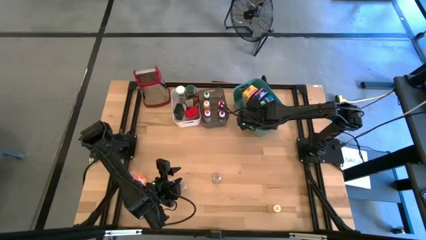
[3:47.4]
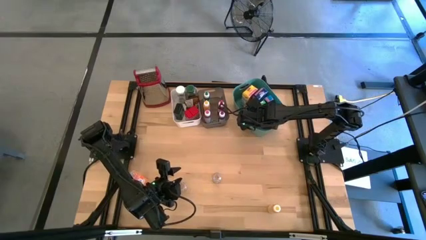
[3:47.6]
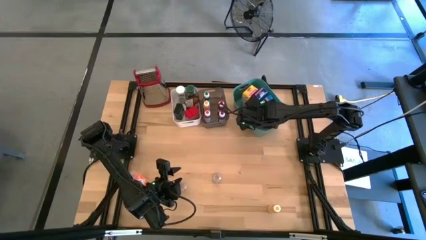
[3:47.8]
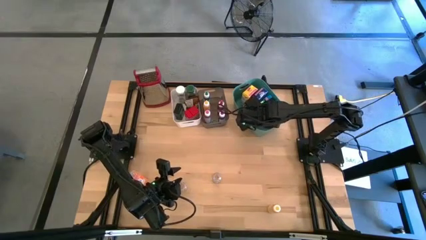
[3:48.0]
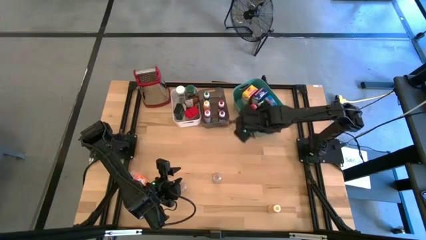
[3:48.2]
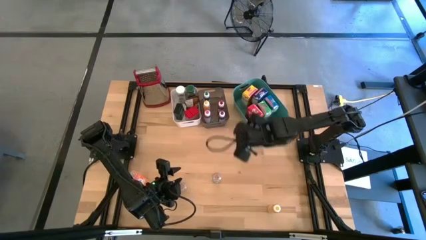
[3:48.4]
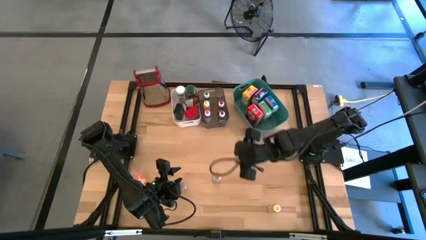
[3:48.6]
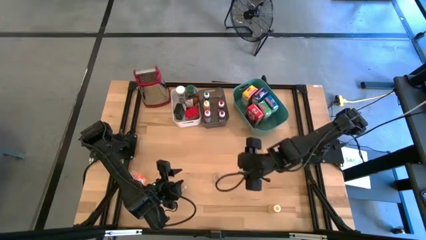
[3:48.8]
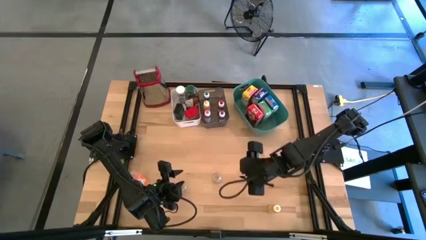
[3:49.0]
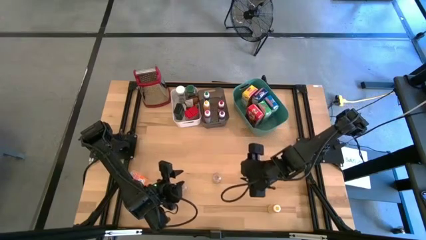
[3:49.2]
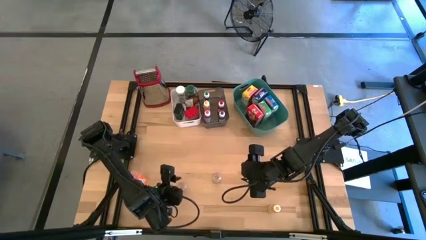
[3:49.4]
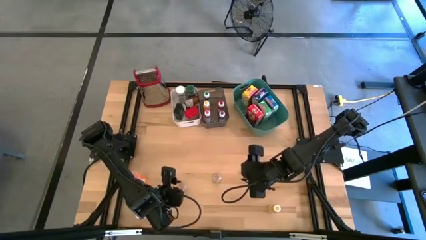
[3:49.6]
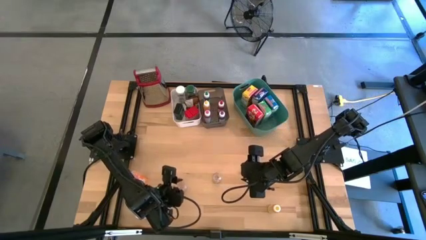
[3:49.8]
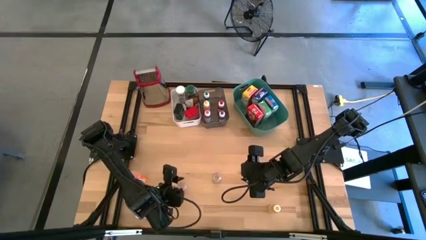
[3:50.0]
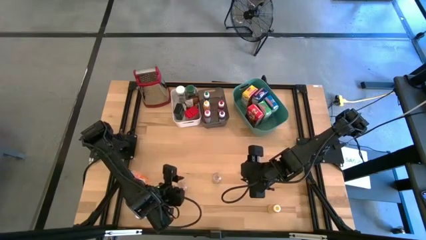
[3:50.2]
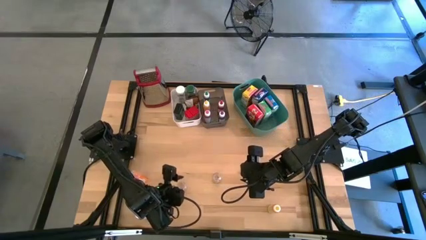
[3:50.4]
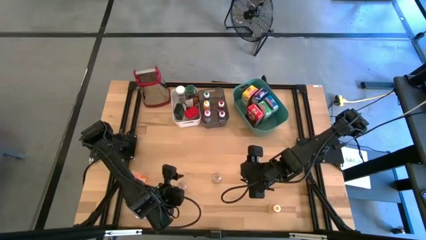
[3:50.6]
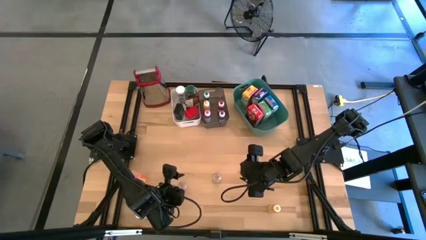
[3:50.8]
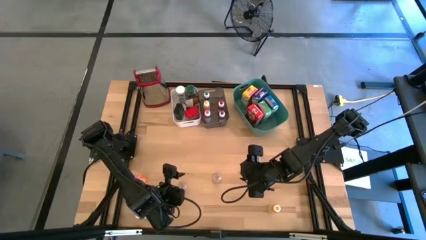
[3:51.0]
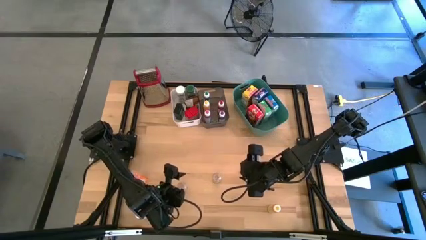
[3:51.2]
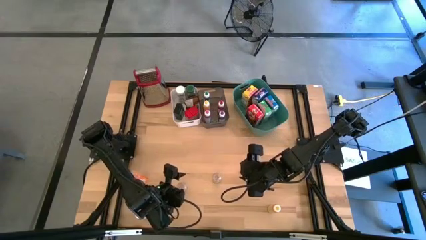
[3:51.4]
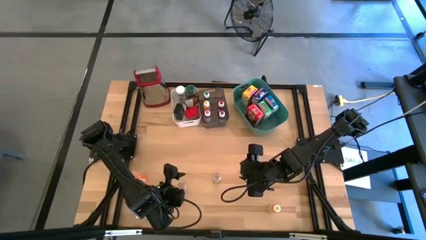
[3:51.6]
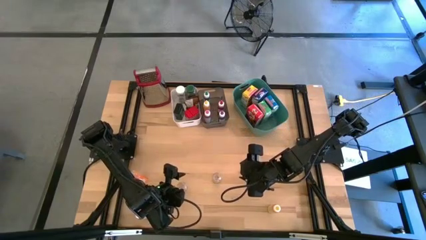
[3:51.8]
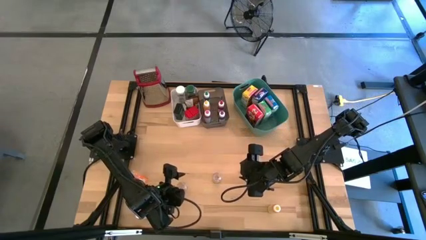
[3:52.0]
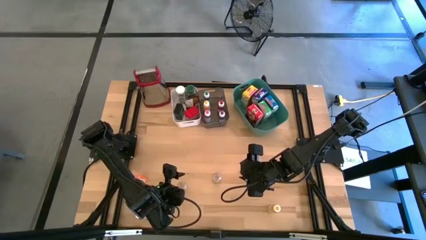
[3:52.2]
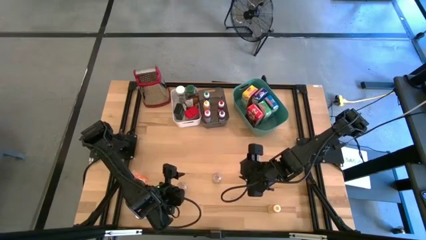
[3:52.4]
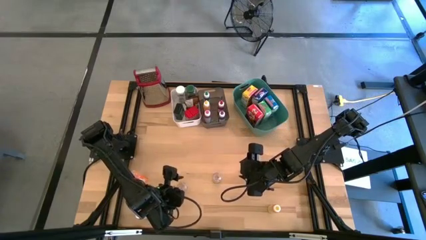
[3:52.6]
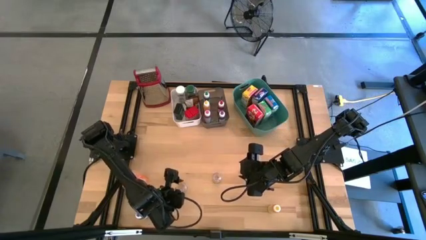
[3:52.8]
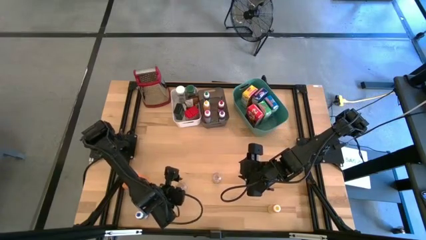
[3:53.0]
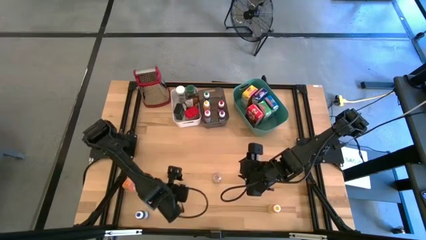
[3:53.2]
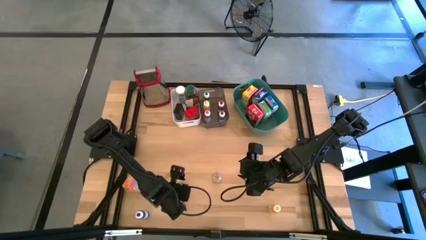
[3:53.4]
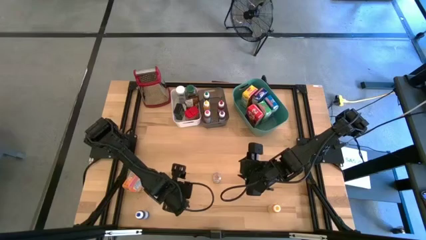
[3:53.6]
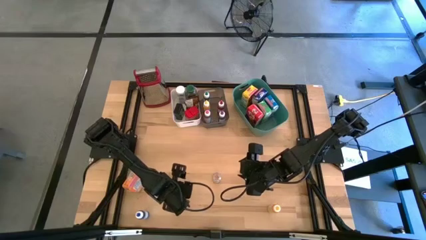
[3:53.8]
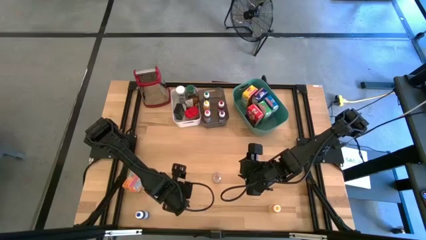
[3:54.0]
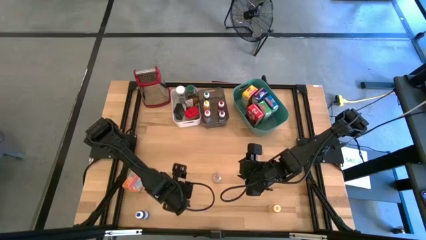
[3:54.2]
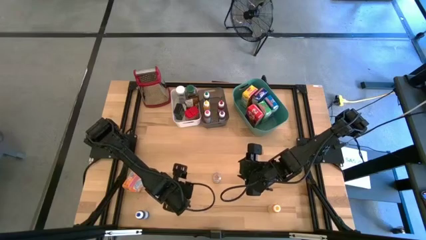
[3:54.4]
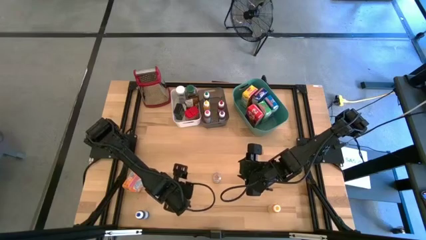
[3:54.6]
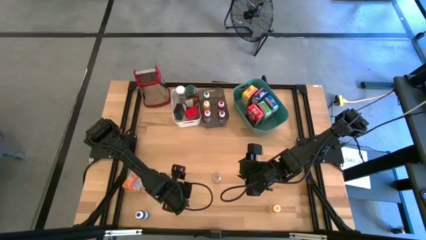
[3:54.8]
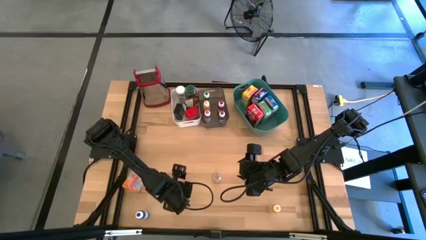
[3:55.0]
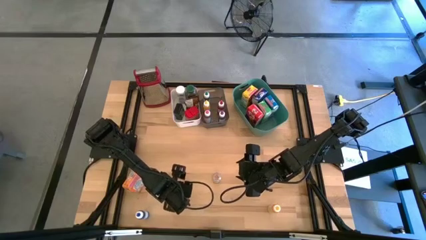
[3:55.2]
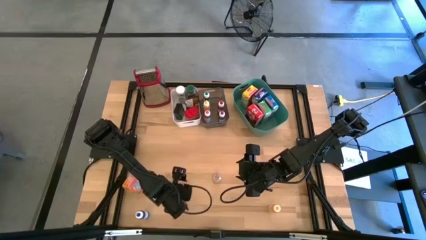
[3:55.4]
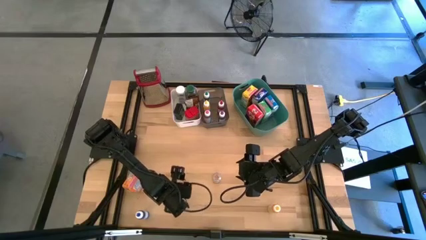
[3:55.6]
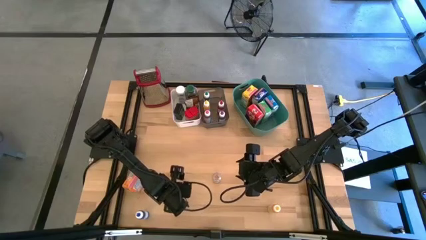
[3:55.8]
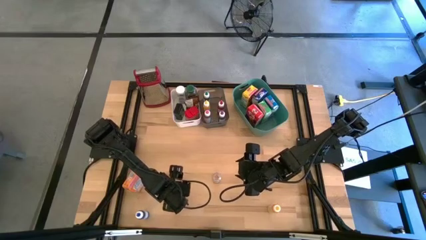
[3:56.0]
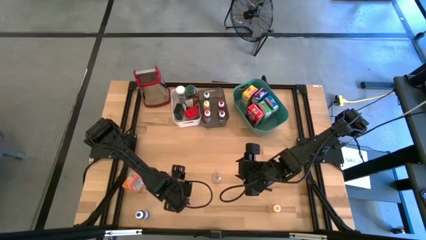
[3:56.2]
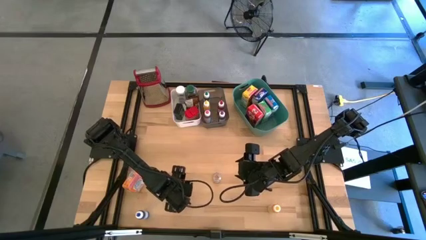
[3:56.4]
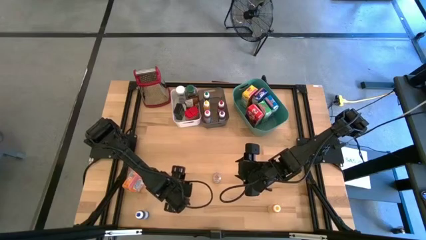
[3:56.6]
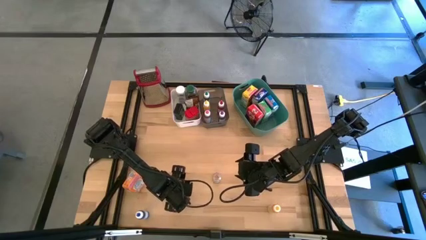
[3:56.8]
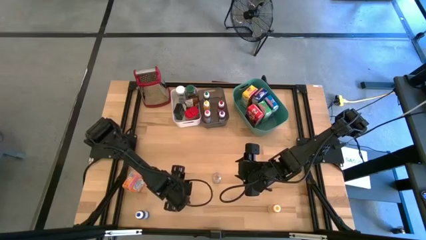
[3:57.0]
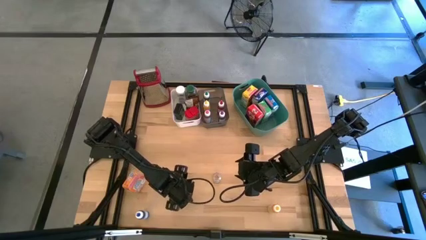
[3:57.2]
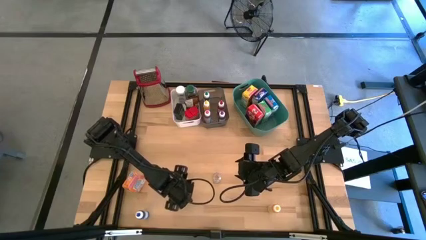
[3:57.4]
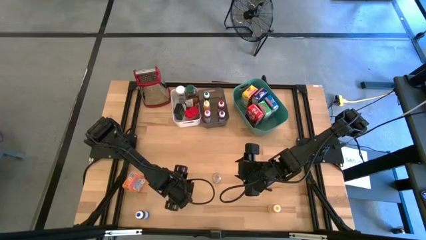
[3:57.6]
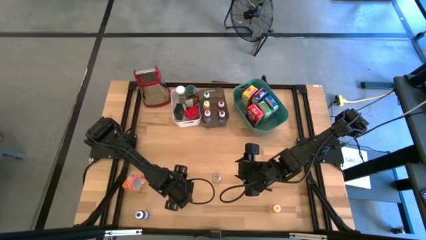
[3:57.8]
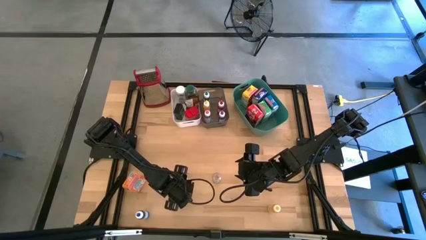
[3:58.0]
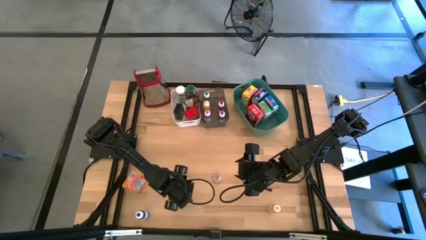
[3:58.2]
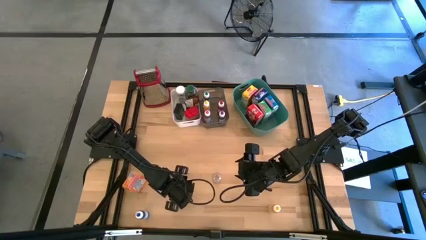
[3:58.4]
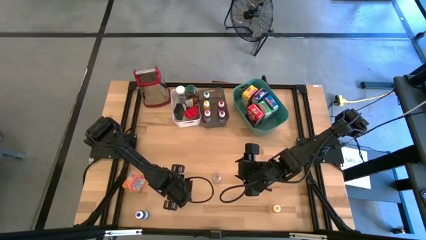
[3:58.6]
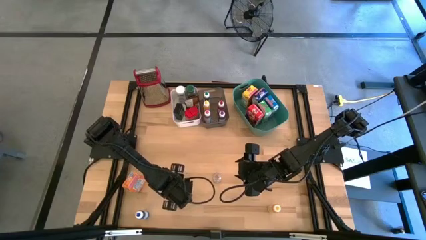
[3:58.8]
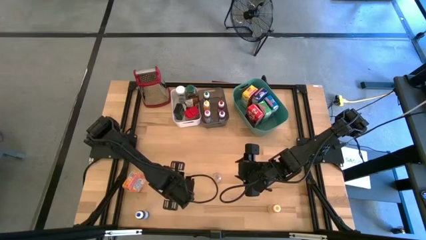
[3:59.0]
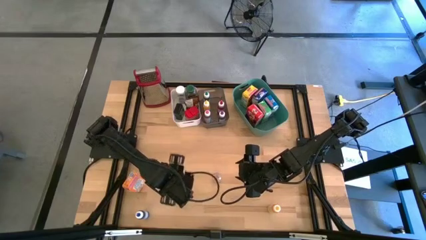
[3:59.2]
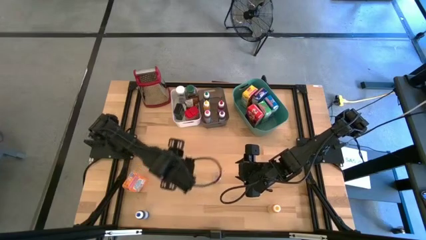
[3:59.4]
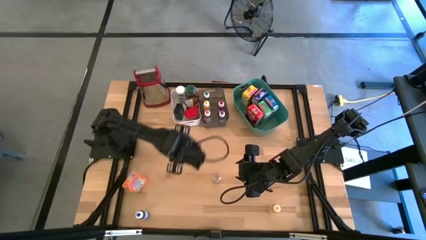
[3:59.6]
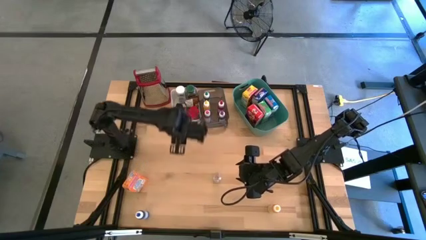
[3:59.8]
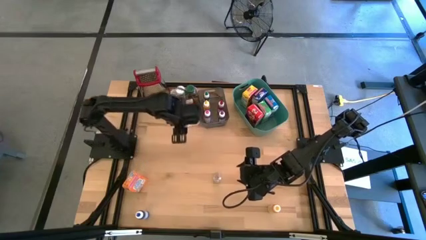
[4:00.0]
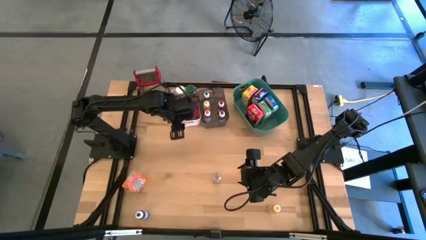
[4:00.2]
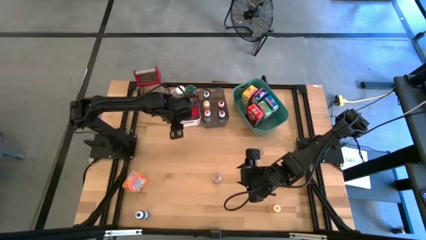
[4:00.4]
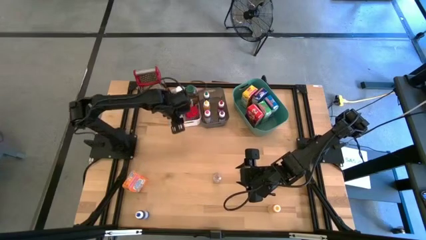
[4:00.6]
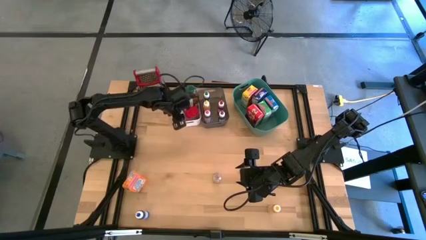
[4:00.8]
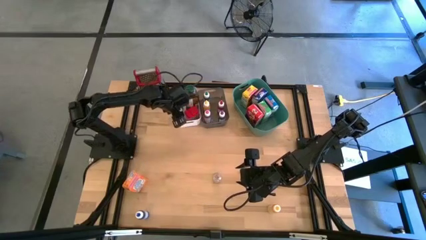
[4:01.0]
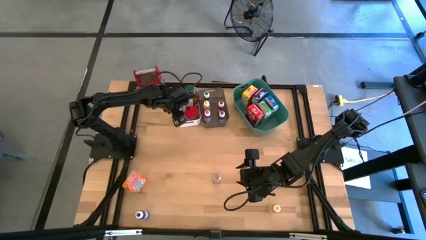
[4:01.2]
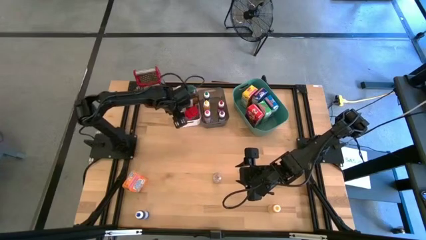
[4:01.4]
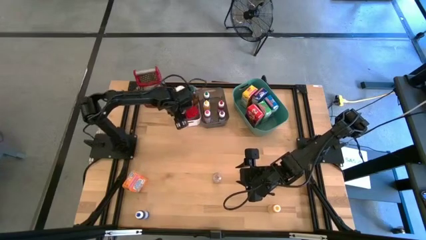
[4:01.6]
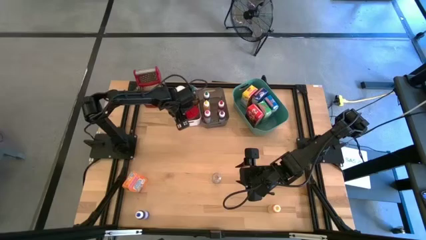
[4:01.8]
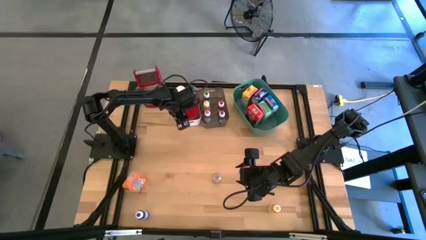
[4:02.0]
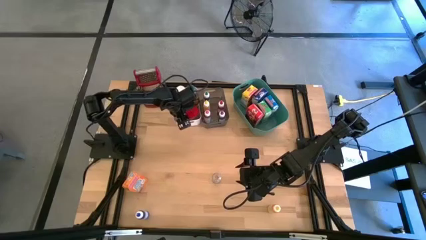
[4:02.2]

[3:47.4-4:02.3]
Task: Pick & Place Kitchen Items
Put the left brown spice can into the left white bin

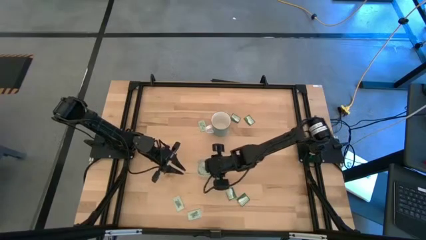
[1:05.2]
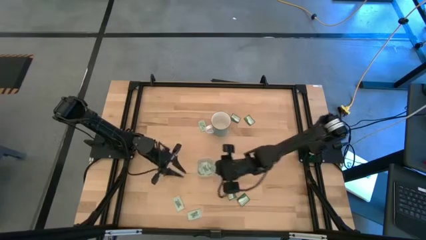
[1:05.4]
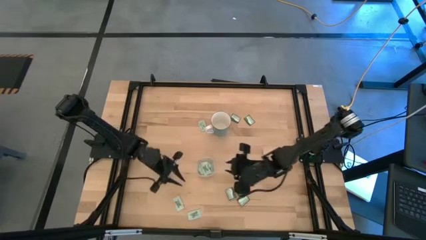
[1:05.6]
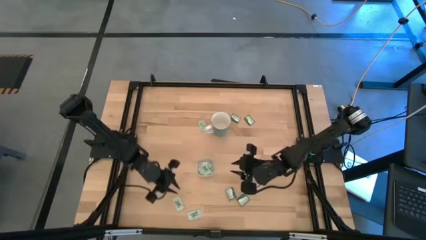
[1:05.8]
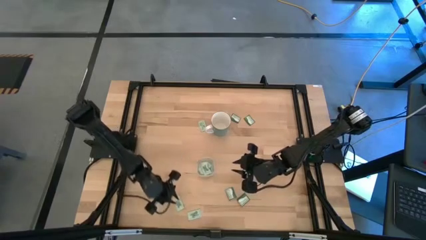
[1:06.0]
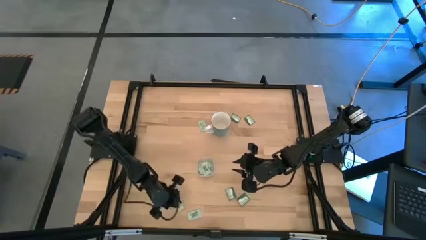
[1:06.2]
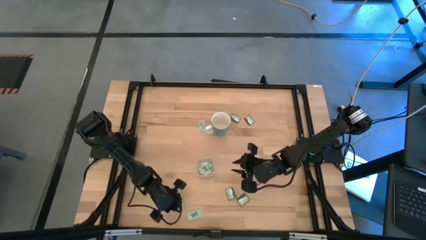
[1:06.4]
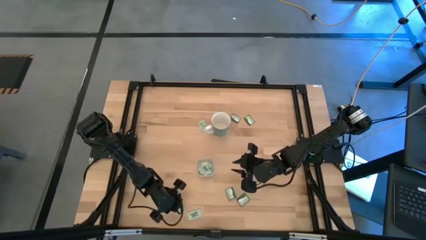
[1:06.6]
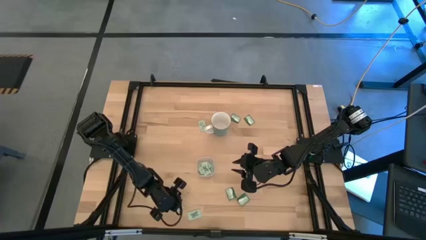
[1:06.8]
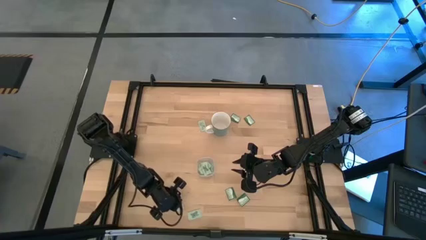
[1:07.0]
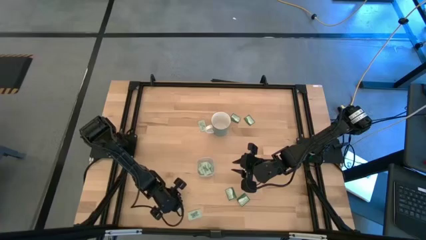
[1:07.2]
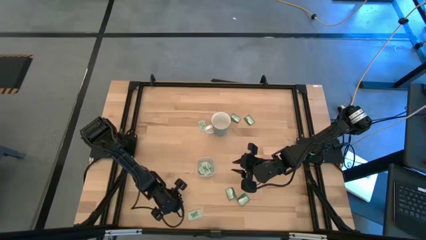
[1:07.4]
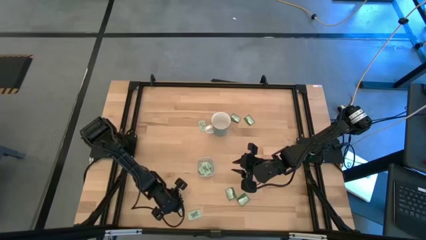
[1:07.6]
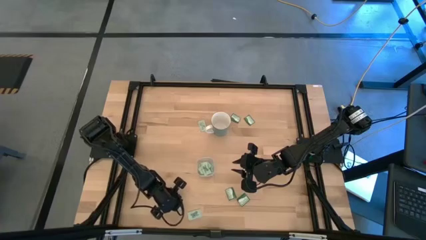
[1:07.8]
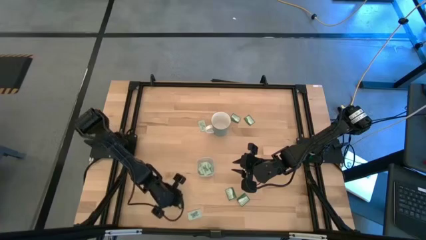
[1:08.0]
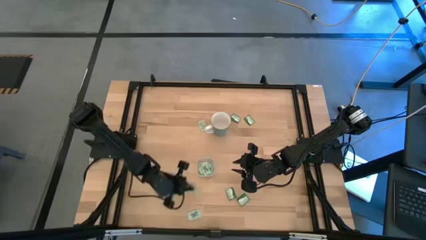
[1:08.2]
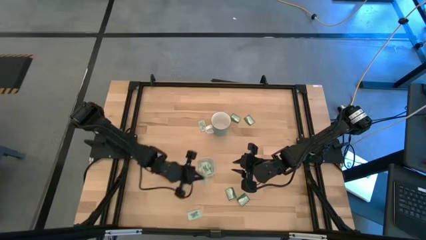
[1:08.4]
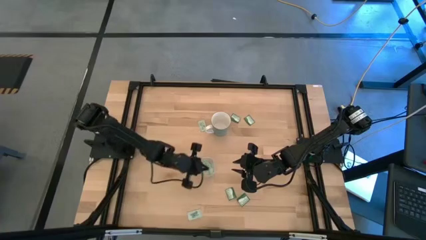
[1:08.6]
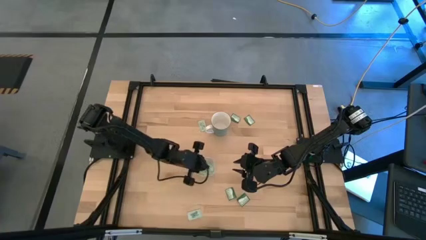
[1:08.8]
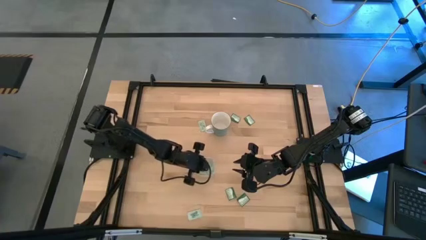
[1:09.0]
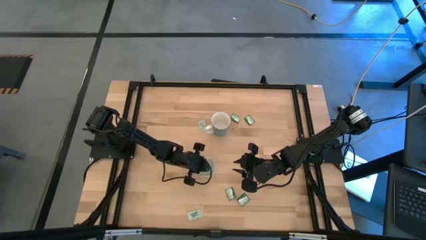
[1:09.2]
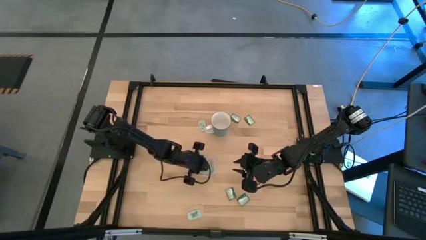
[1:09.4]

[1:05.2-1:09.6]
Task: Pick and place Stevia / Truvia into bins
Put the white stevia packet into the transparent bin
